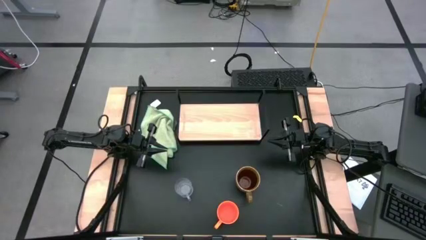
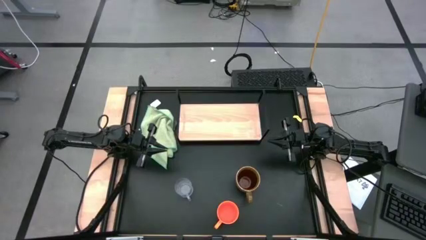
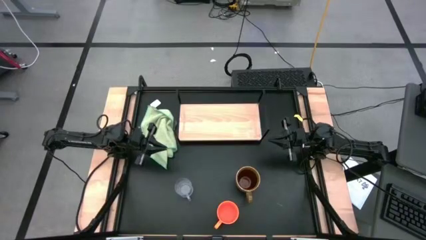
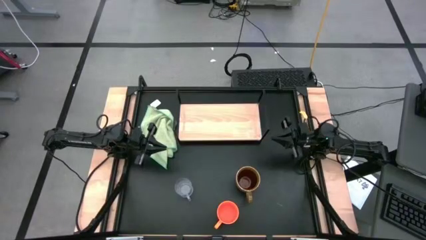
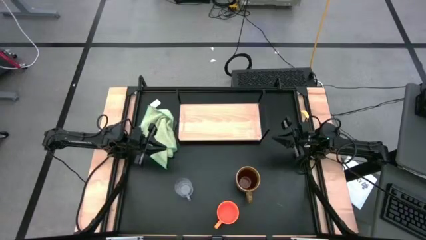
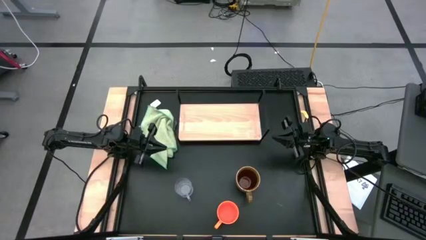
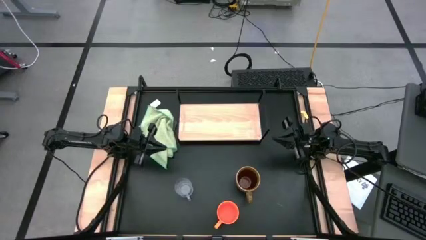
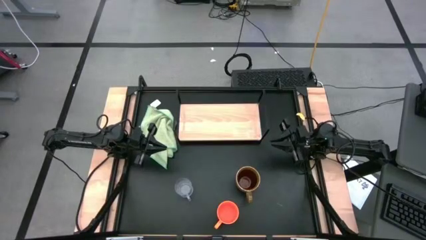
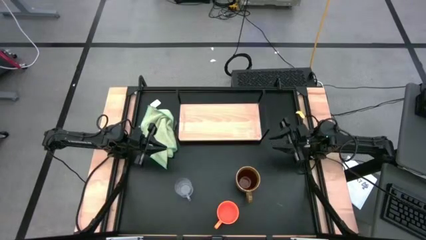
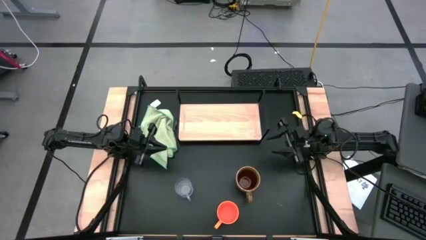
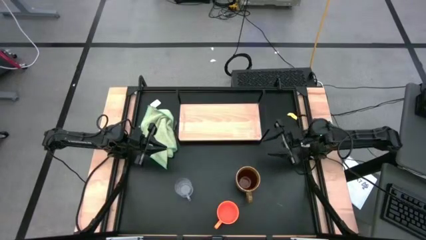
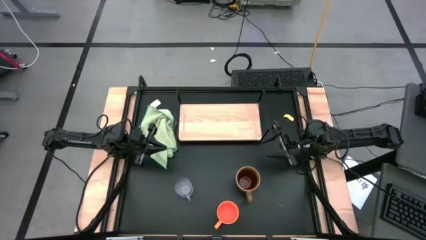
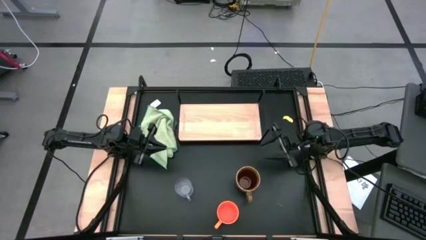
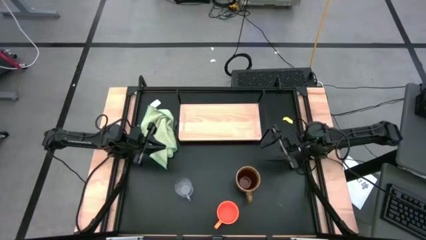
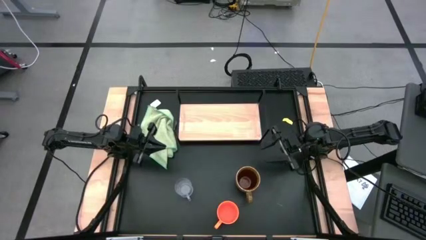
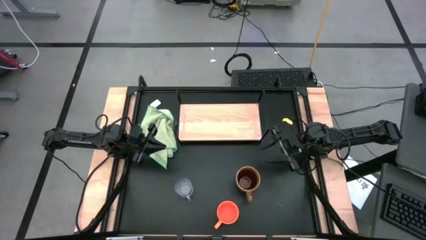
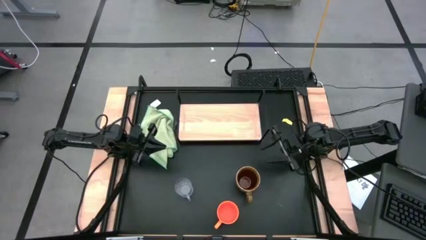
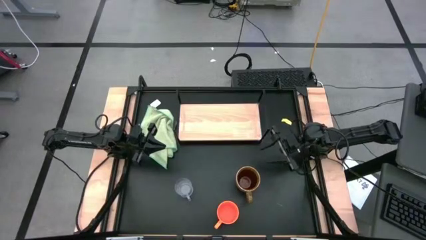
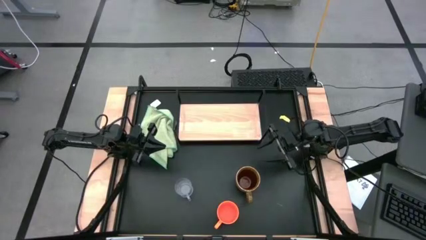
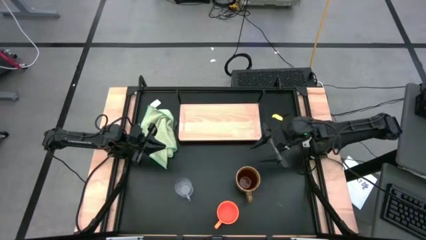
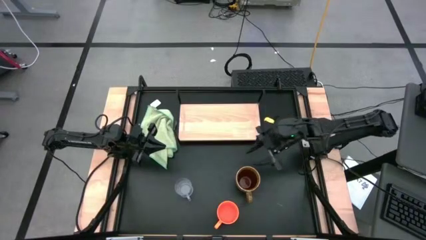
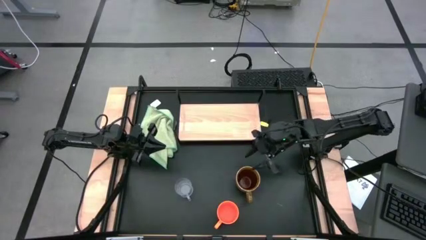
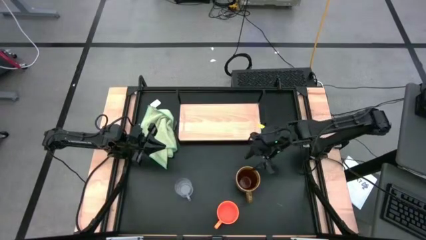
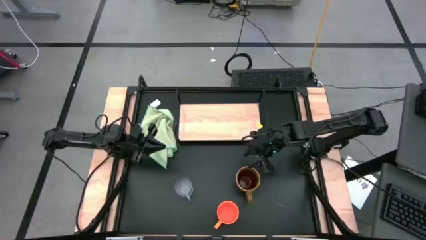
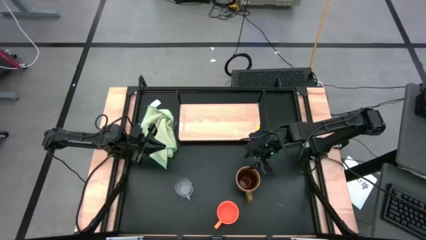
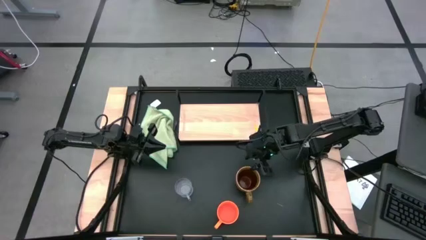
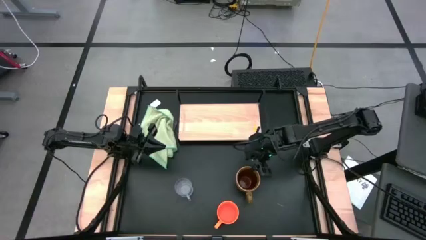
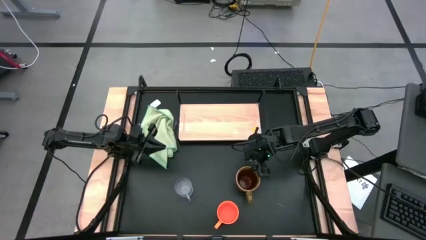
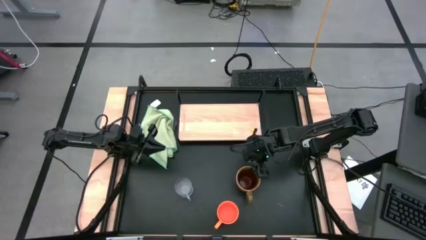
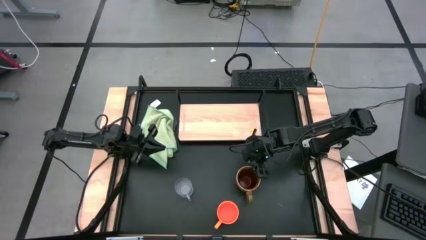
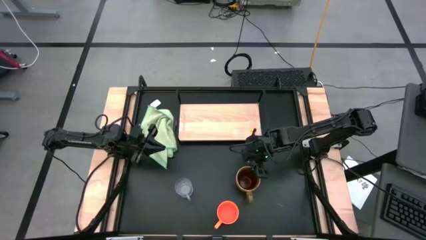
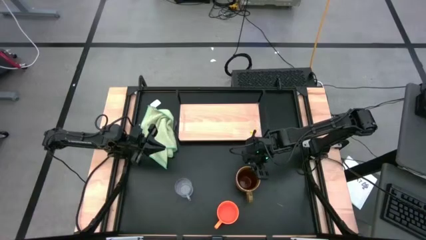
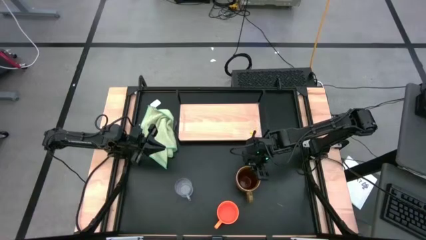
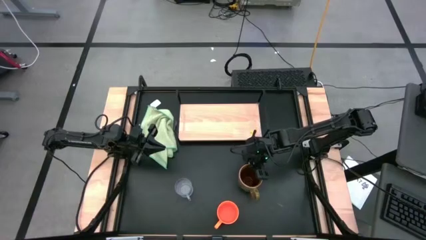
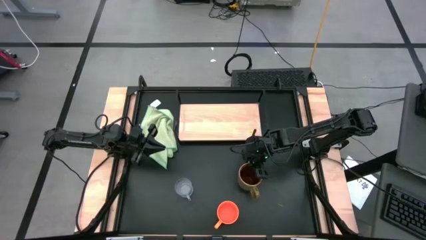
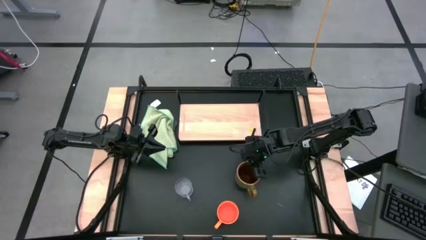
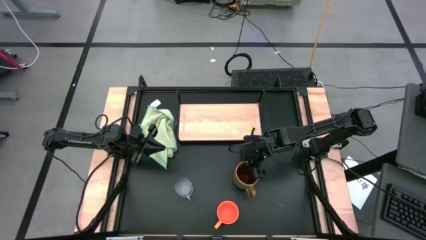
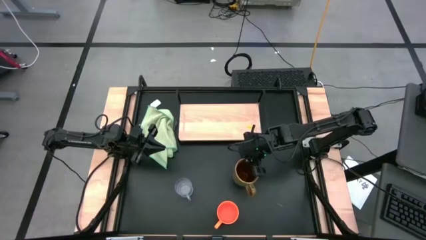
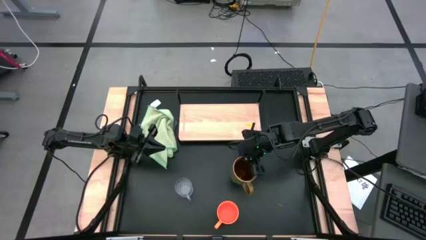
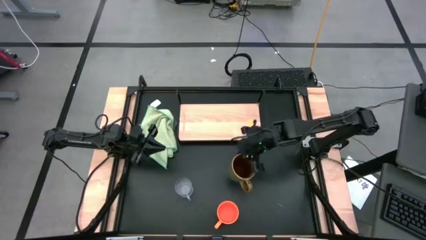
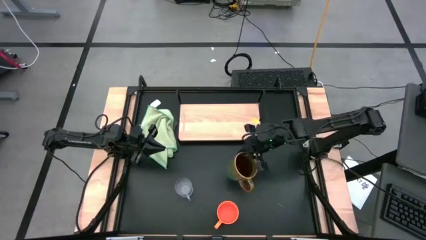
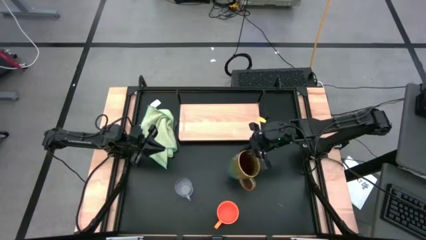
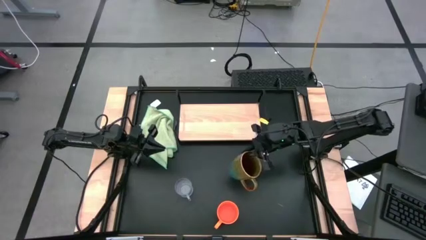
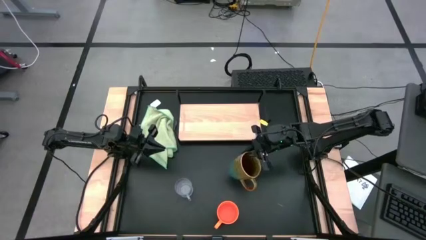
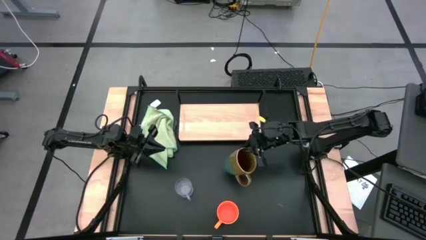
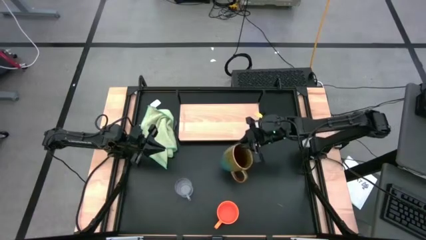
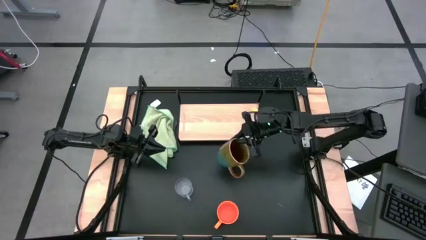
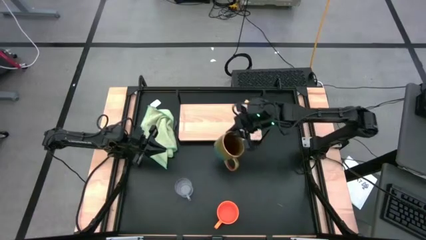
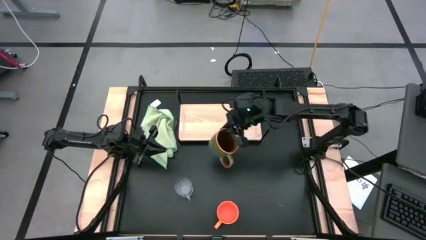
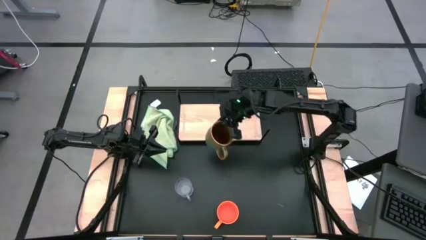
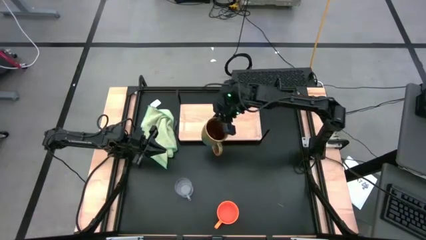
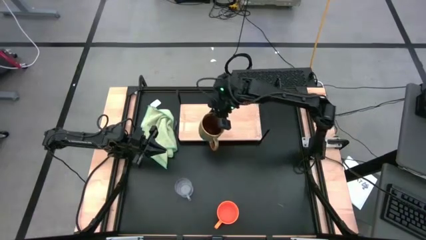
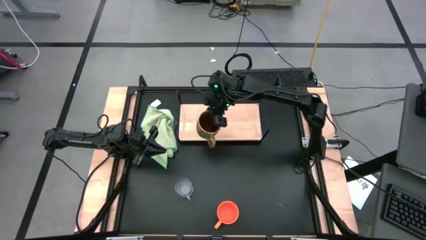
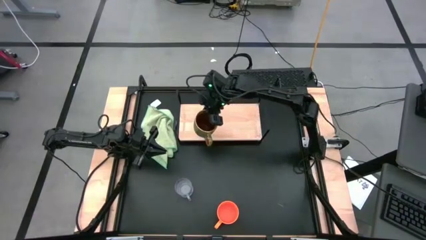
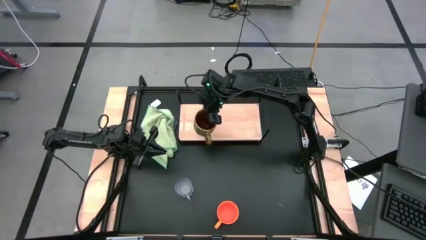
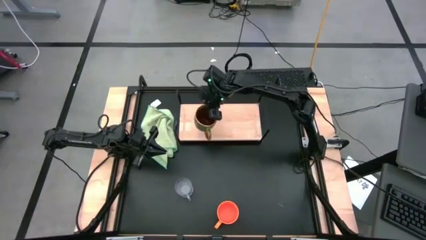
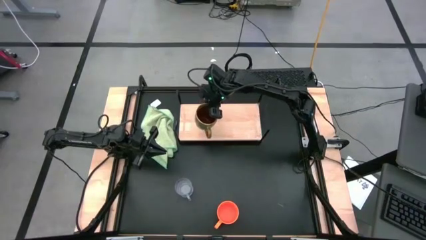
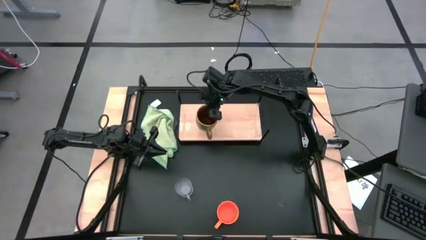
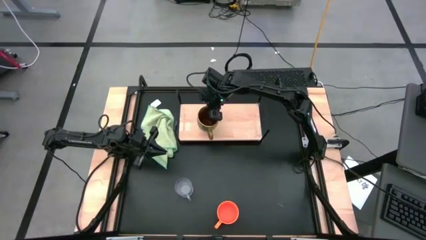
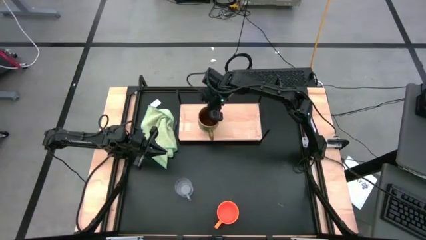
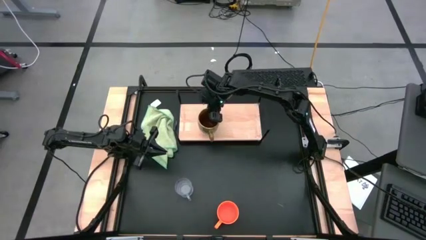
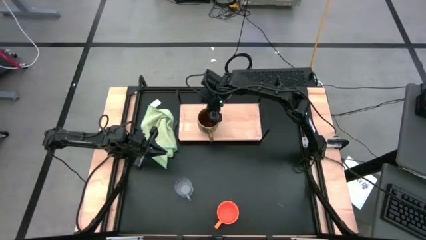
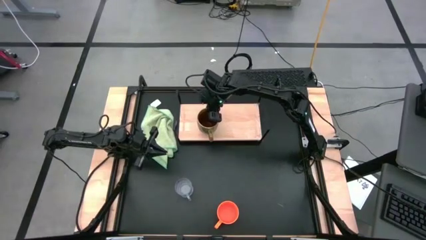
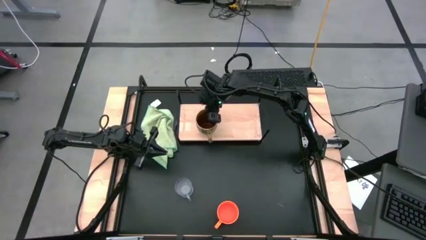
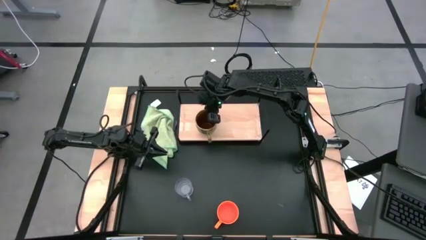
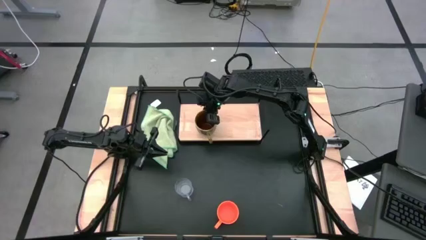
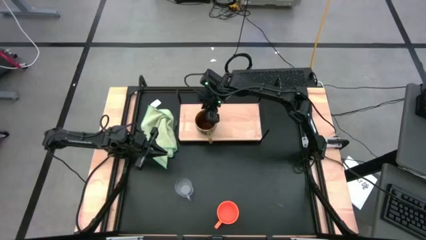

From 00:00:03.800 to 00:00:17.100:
Task: Stack small to large cups/mugs on shelf
Put the light green mug on the shelf
